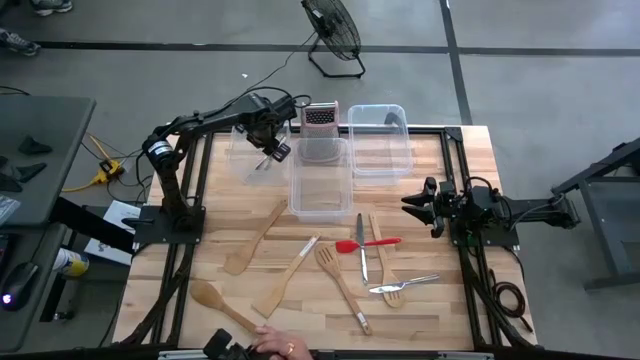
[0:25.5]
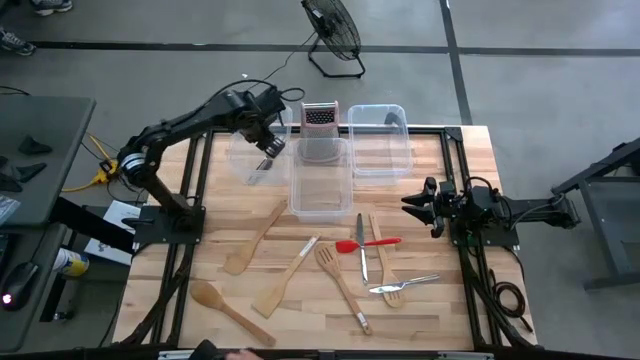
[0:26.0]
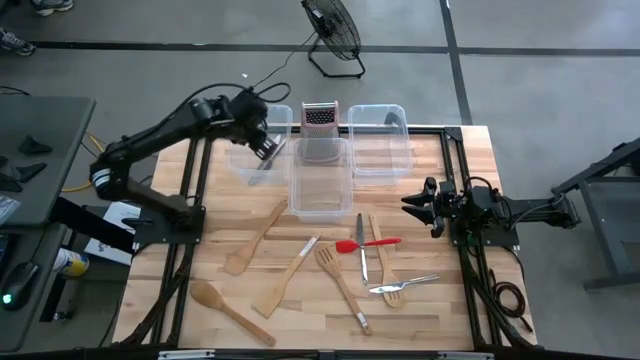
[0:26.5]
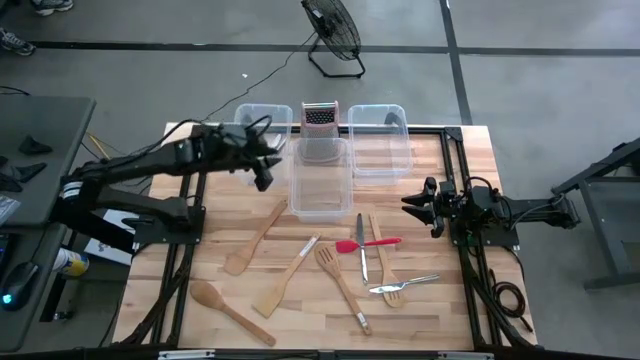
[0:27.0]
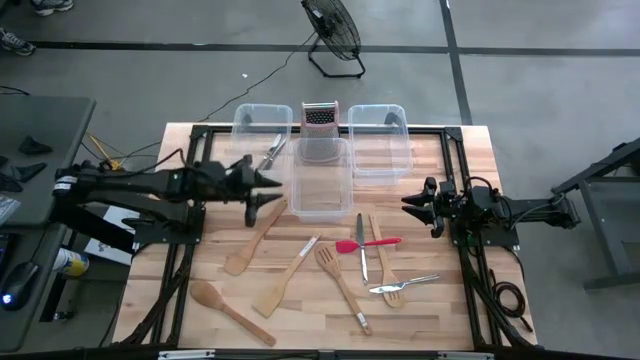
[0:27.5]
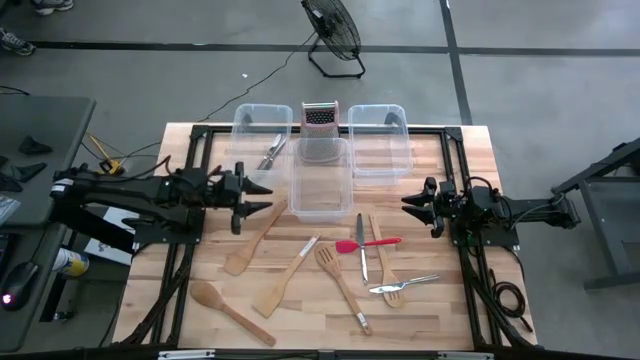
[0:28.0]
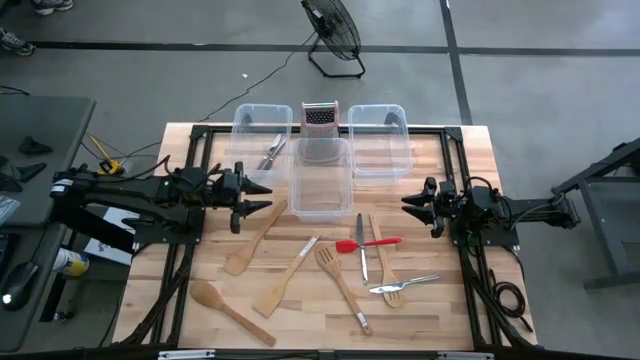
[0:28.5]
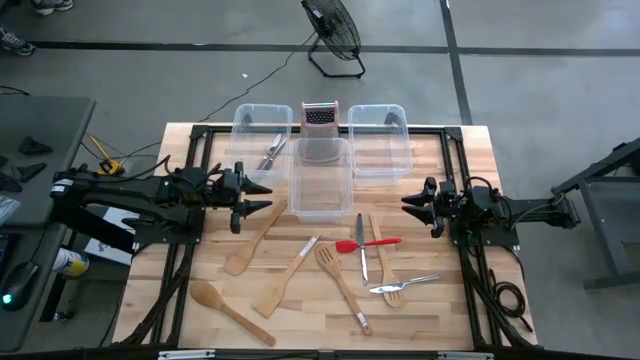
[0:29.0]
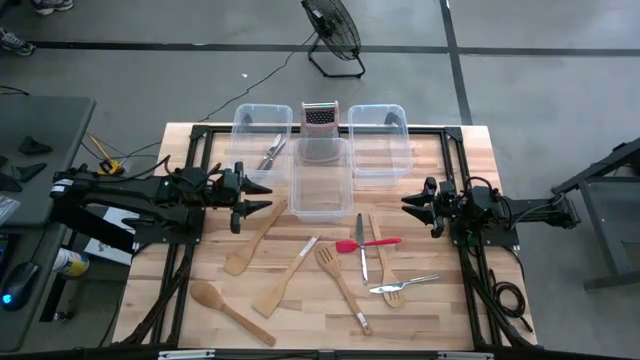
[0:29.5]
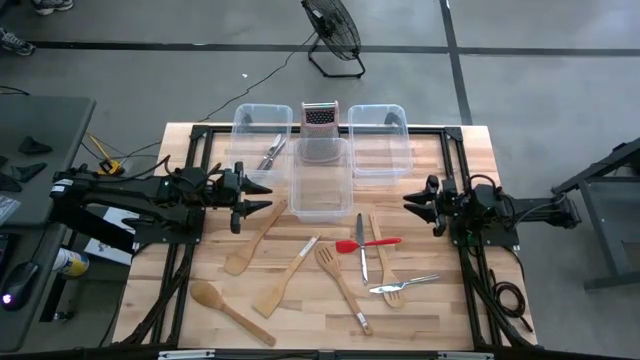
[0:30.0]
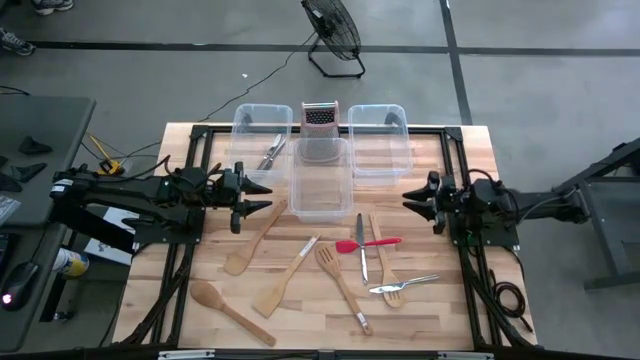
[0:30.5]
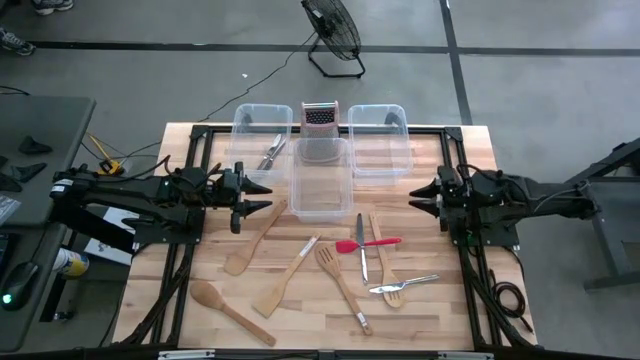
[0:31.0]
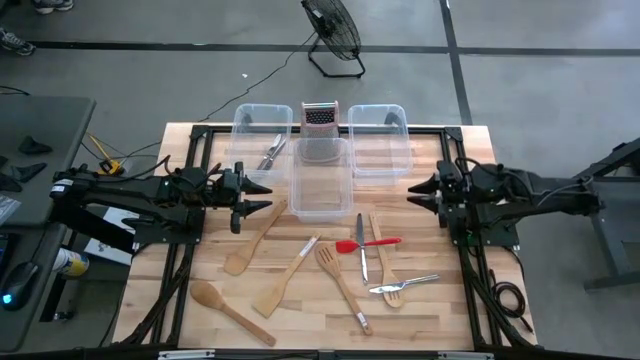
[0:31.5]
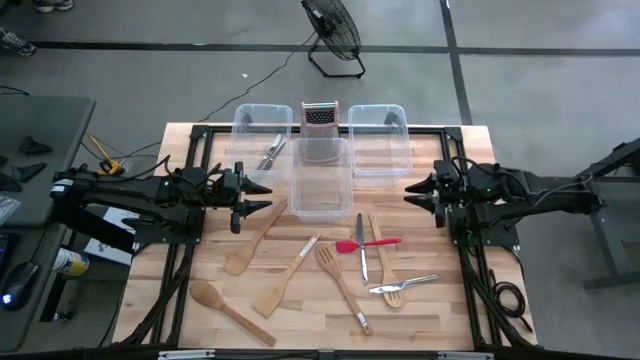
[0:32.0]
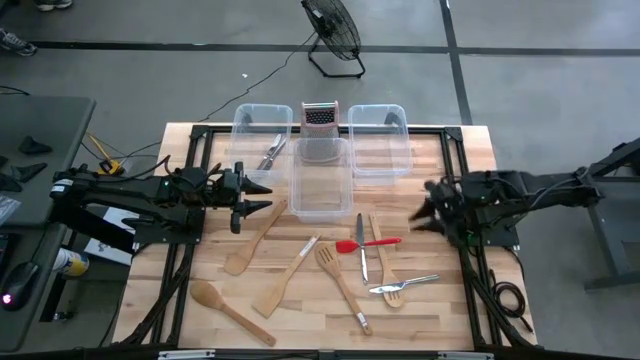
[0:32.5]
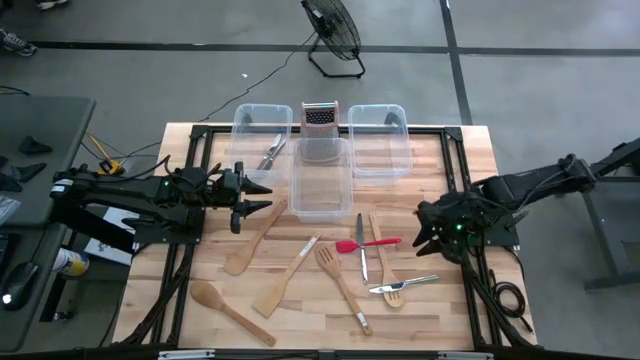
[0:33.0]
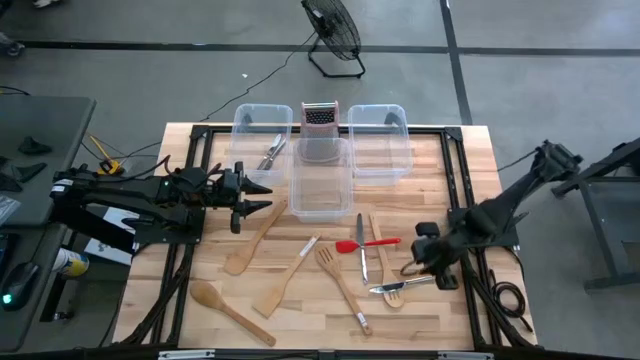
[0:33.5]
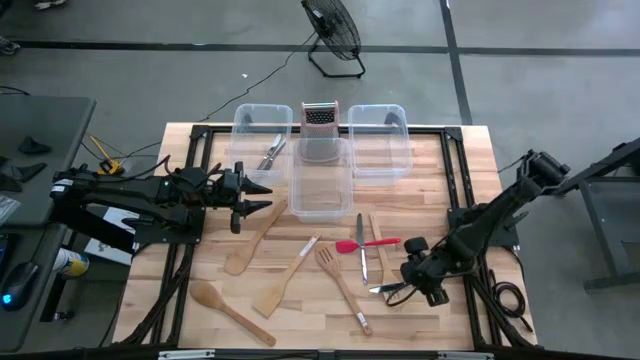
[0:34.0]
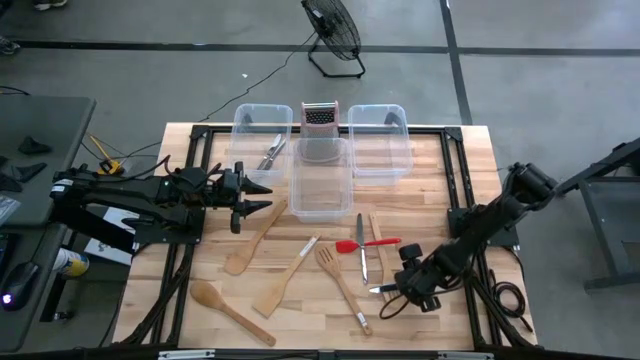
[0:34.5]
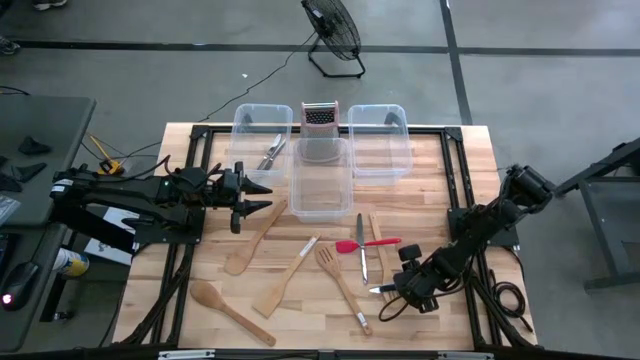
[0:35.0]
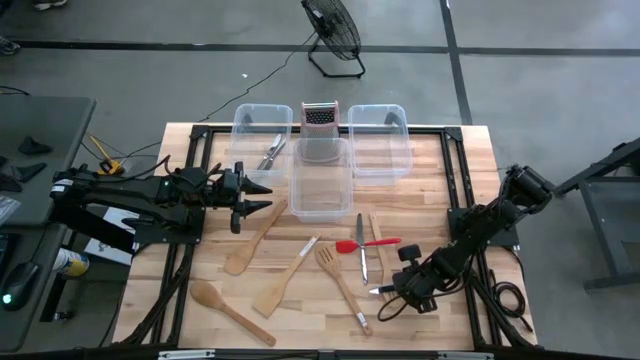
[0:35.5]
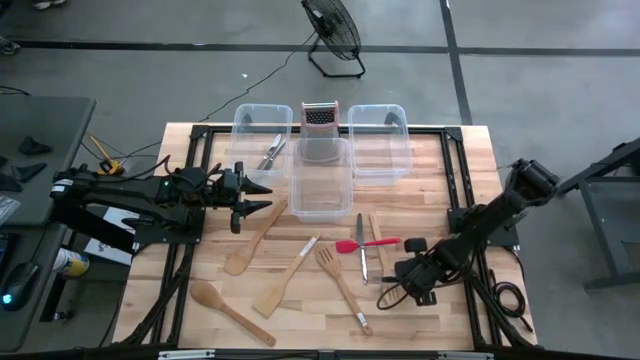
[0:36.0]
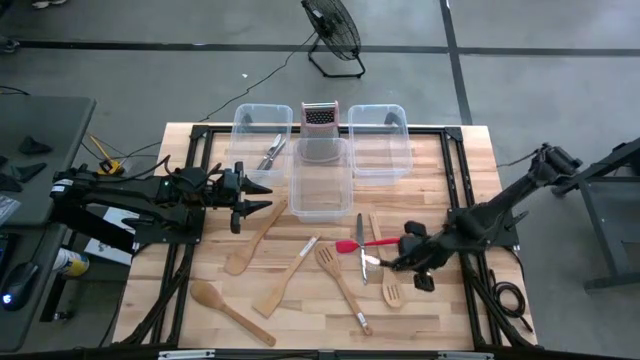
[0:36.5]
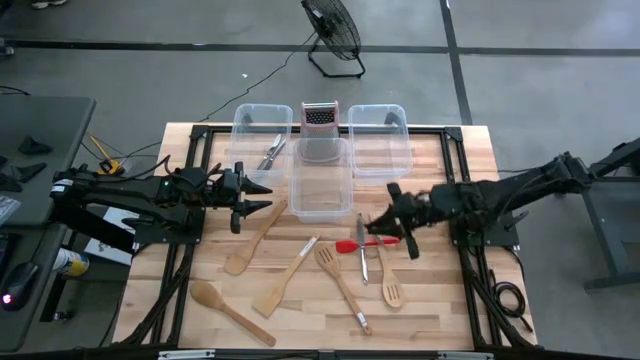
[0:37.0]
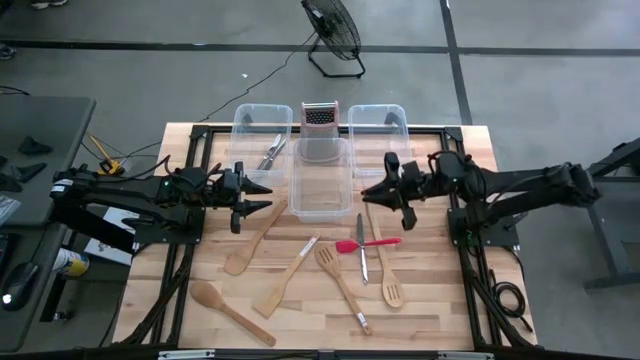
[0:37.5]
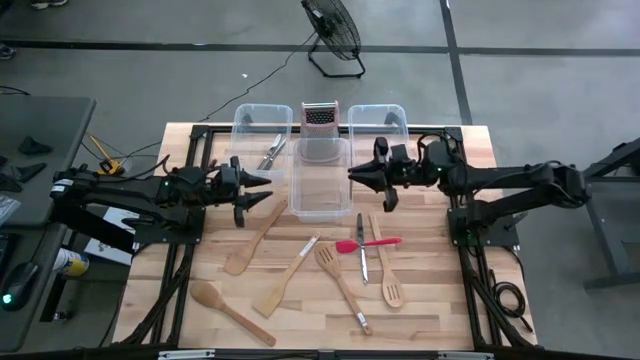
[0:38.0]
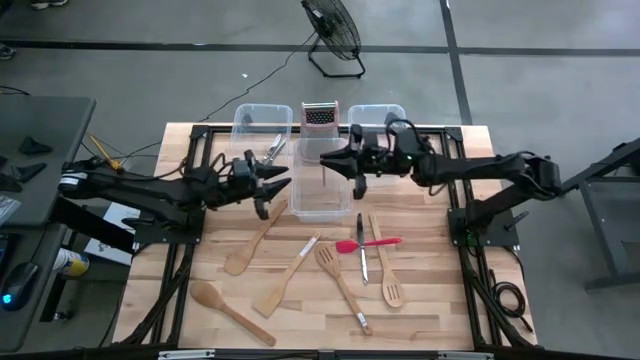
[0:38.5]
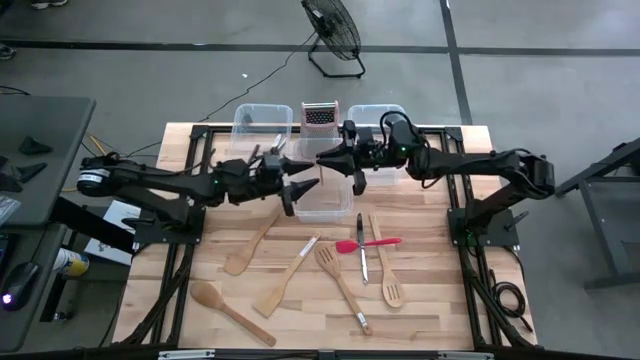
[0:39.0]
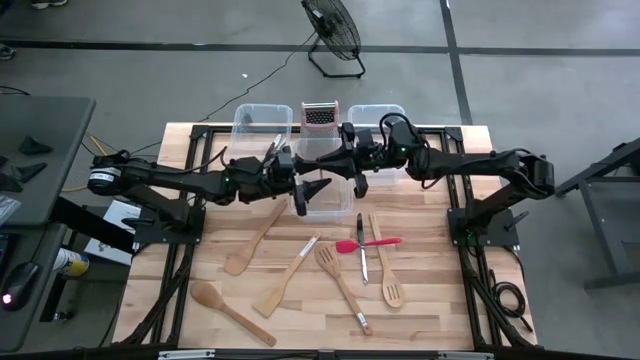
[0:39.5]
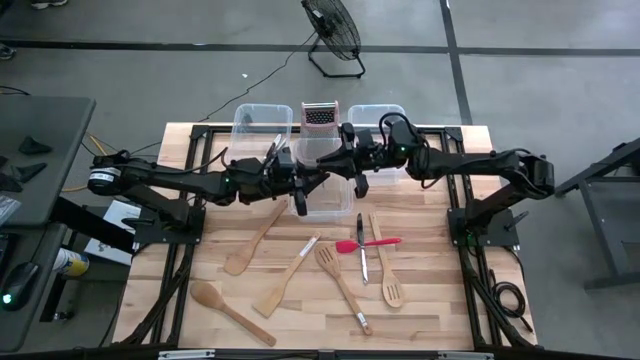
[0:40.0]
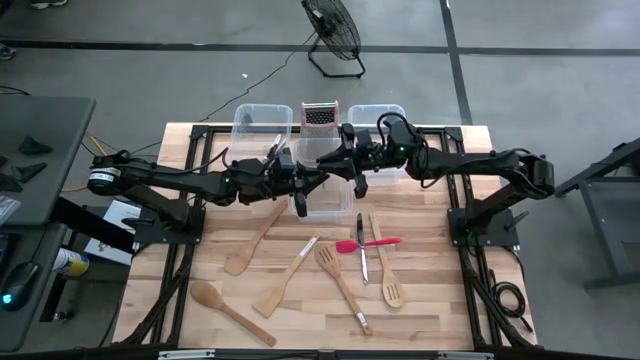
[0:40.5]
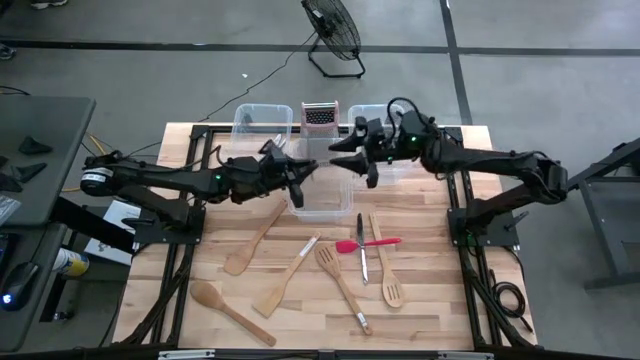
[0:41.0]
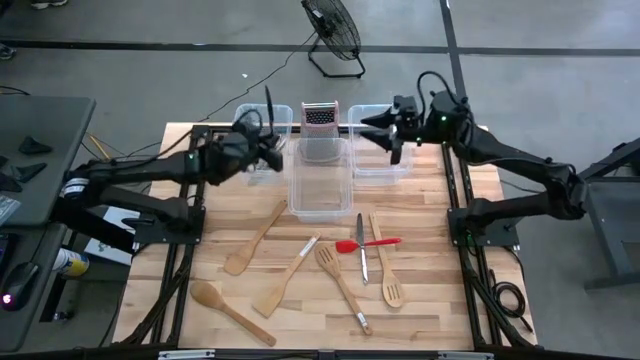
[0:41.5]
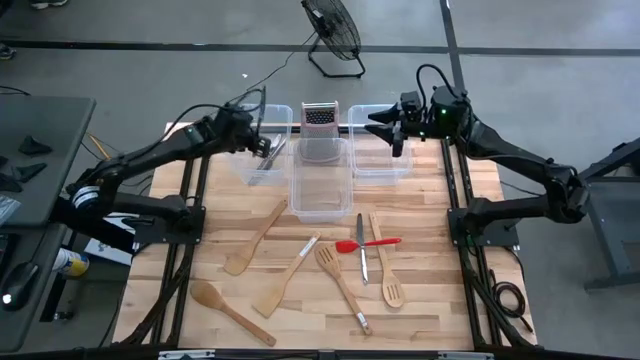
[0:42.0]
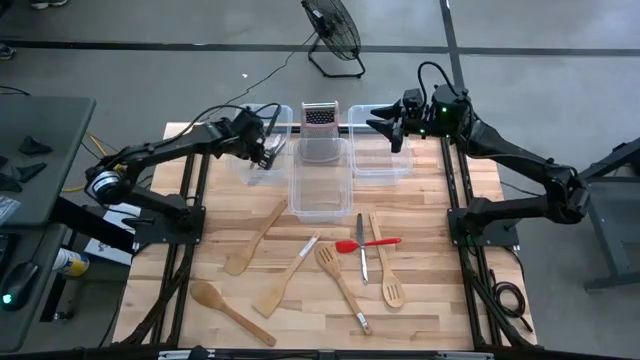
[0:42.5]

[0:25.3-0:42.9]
Task: Pick & Place Kitchen Items
Put the silver knife into the left transparent bin
